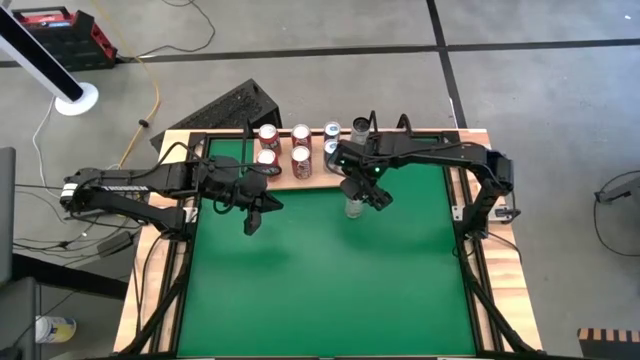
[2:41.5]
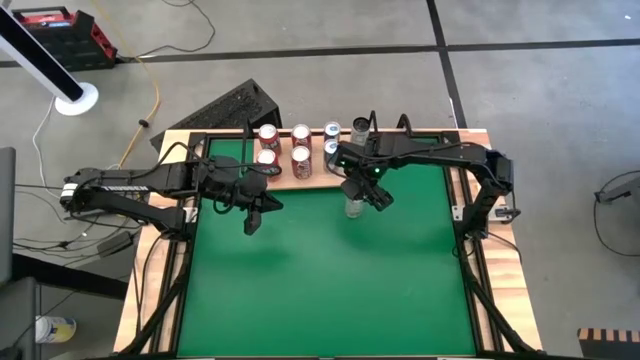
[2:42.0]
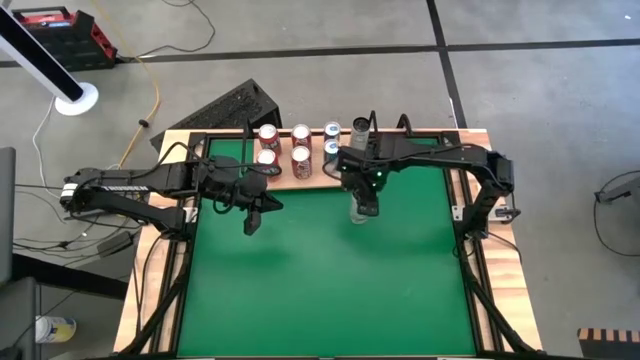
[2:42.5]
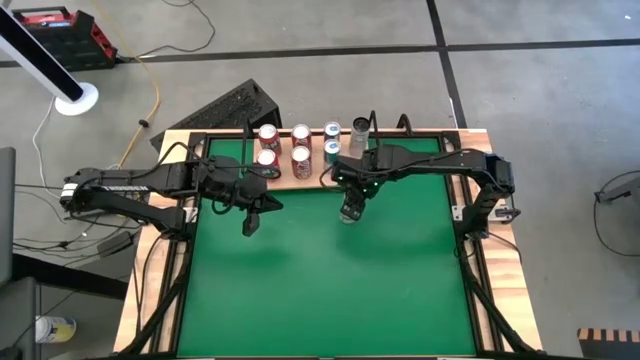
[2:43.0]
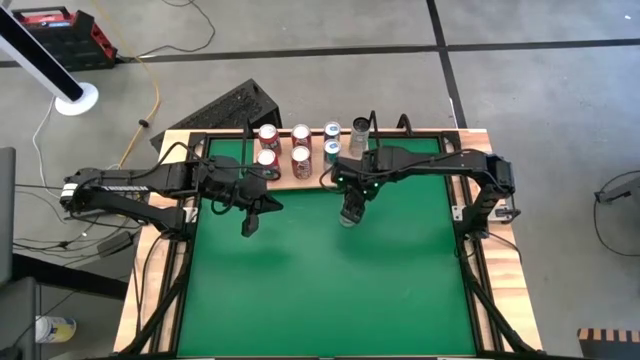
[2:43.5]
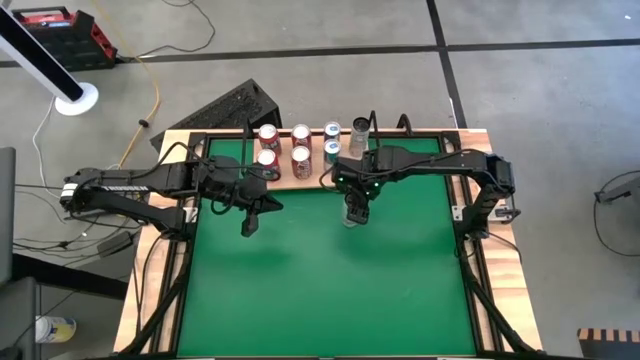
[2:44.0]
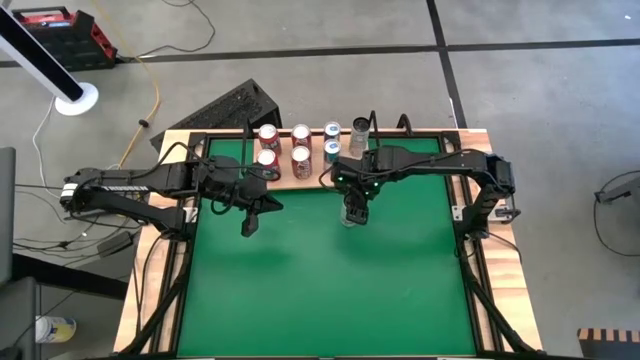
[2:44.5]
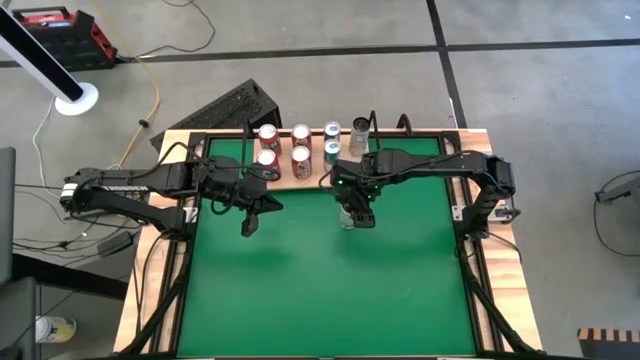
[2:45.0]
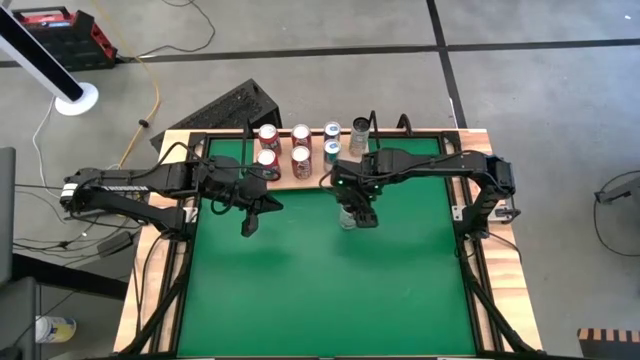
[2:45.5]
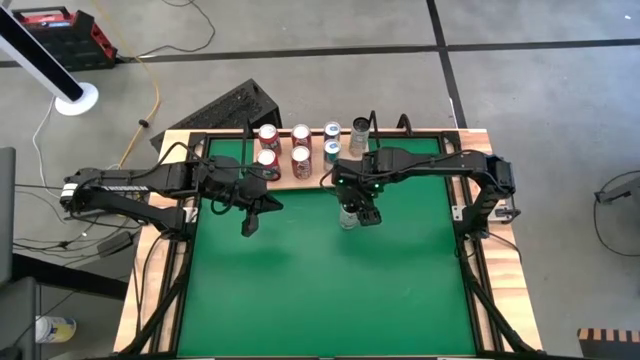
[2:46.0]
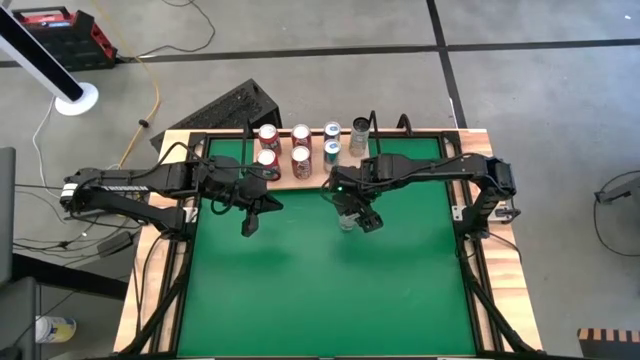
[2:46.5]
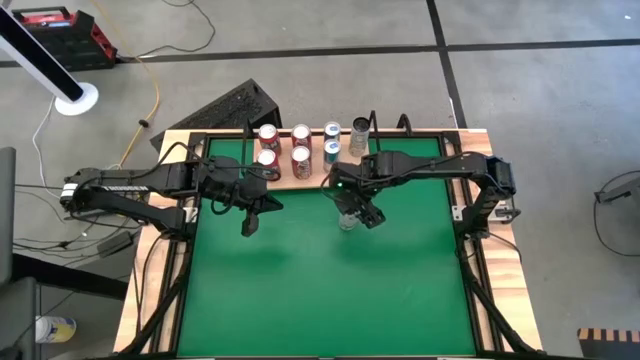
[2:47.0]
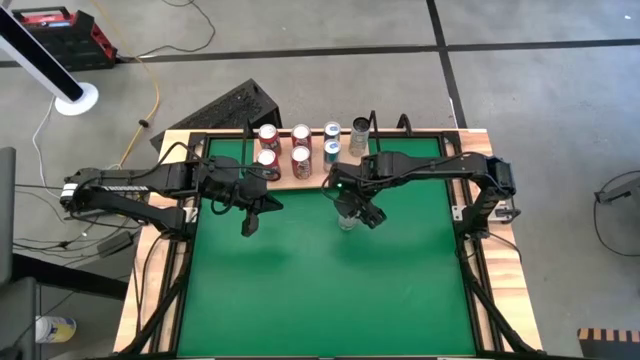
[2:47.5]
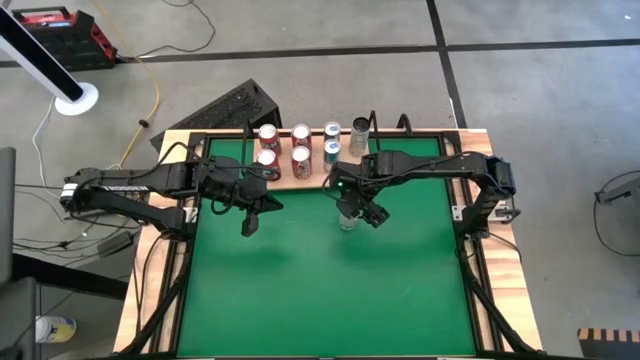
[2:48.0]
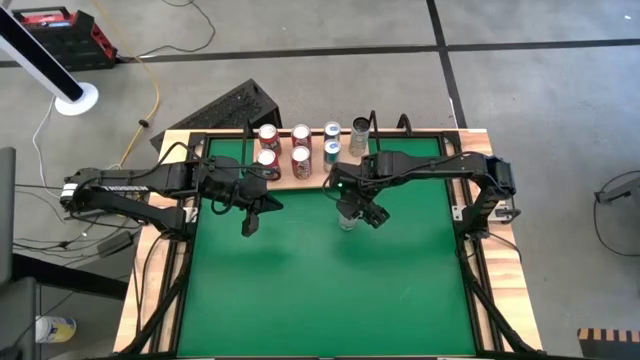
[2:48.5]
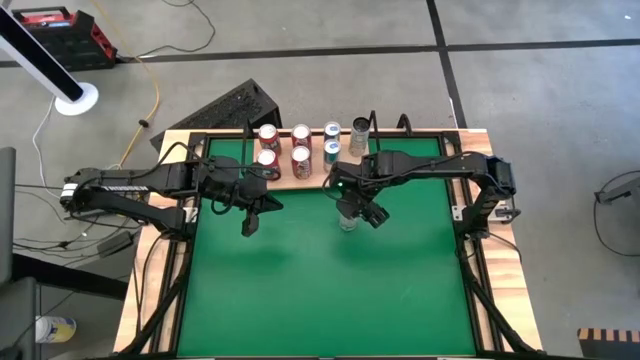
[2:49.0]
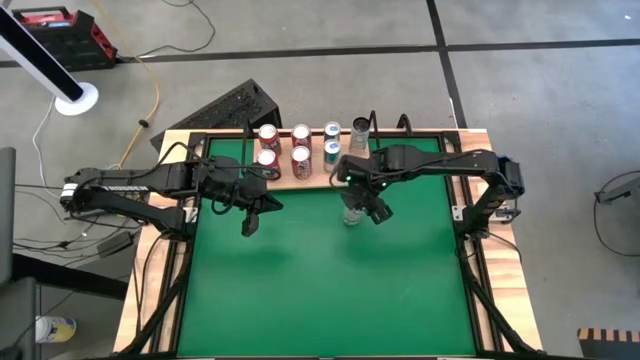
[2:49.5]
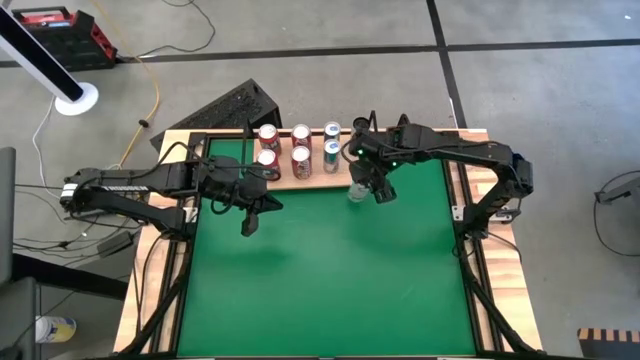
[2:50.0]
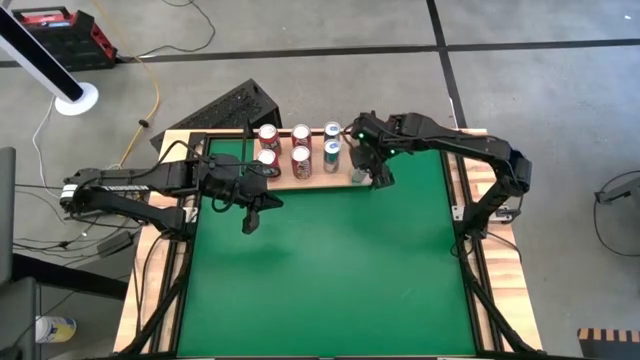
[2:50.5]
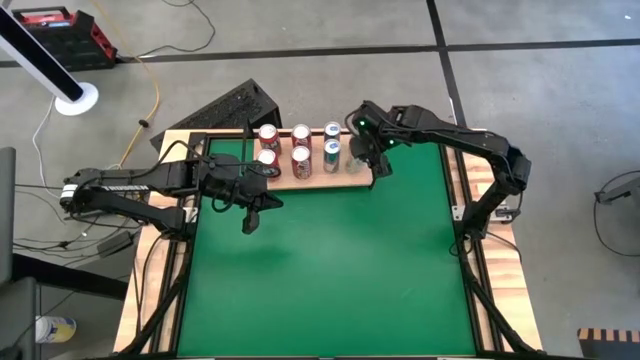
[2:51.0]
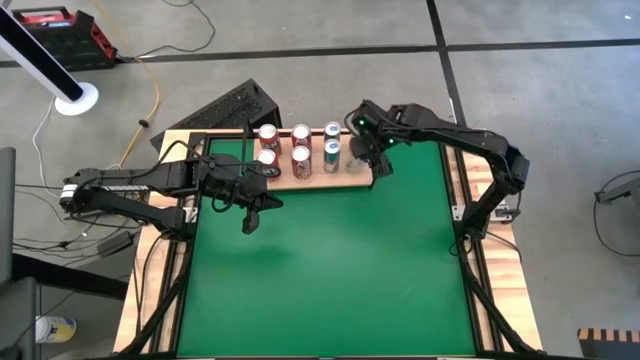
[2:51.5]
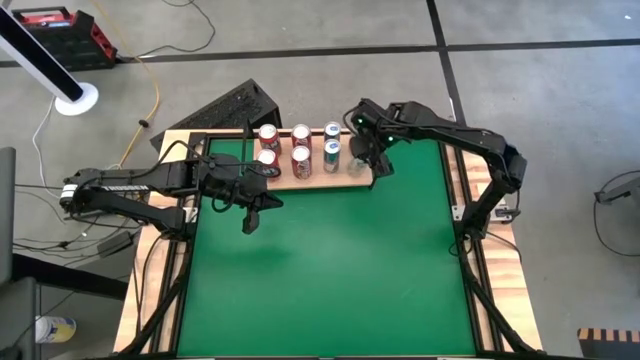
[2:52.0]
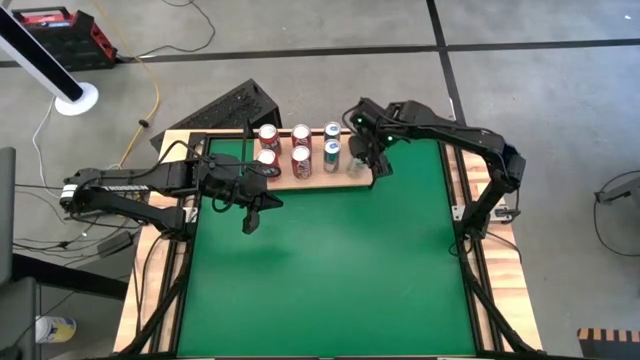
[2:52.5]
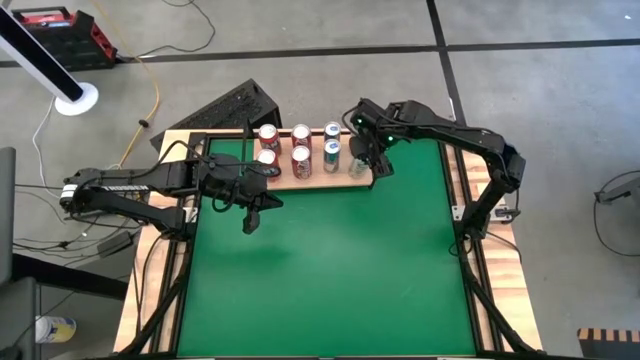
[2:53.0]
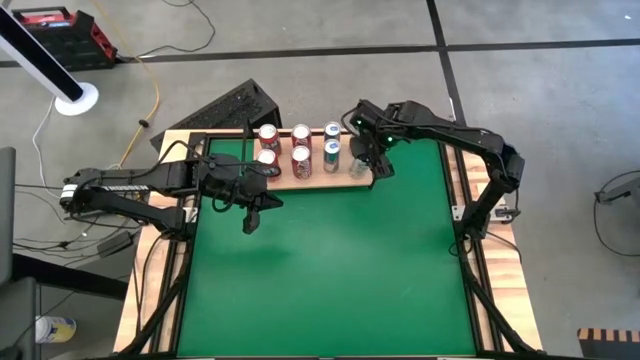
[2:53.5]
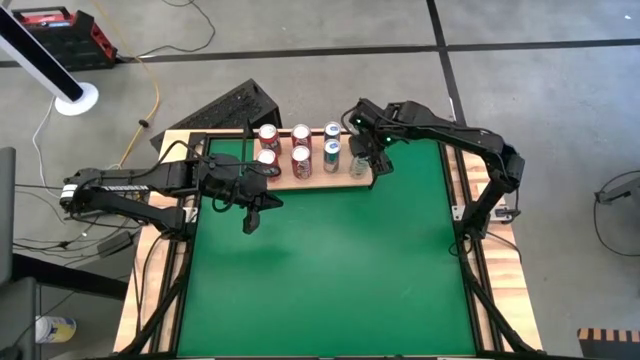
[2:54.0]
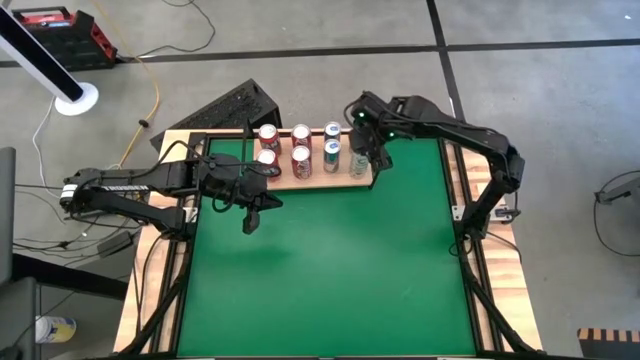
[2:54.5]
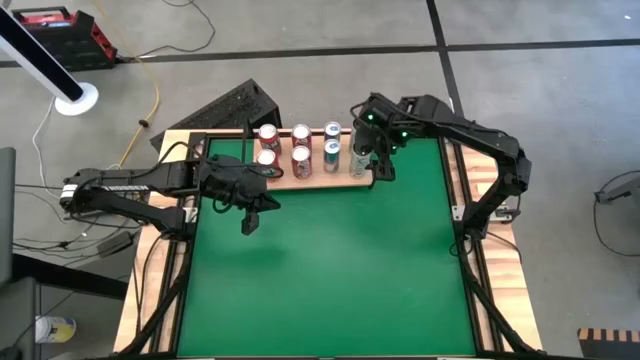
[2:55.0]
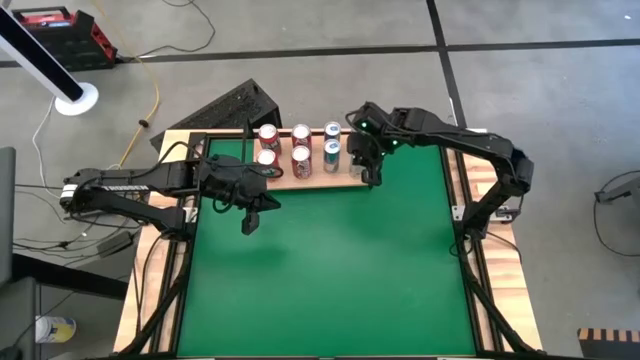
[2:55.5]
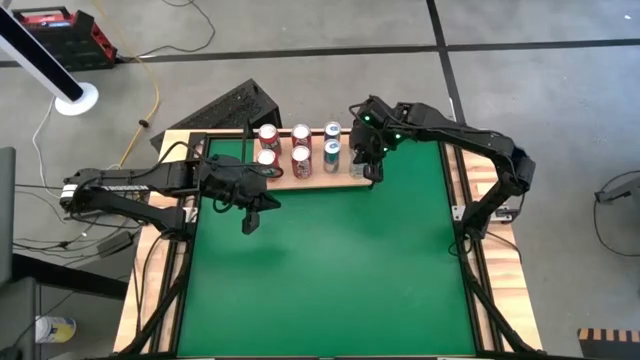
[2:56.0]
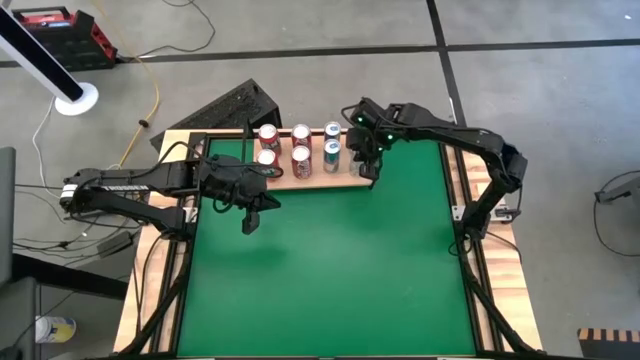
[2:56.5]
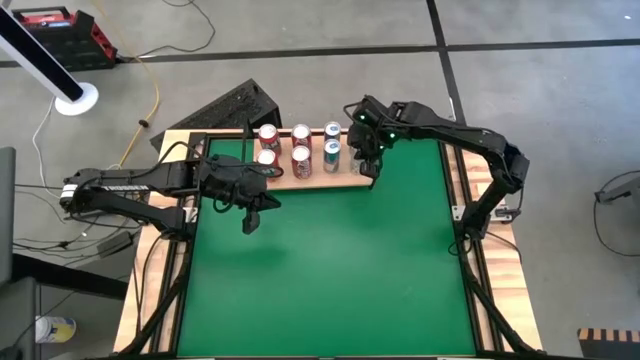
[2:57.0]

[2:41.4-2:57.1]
Task: Place canned beverage on shelf
Put the white and yellow soda can, aligned with the other blue soda can on the shelf

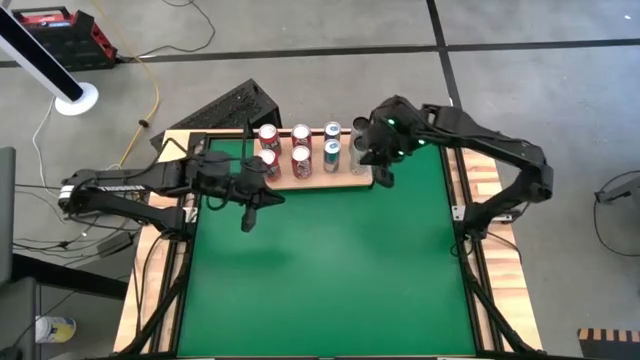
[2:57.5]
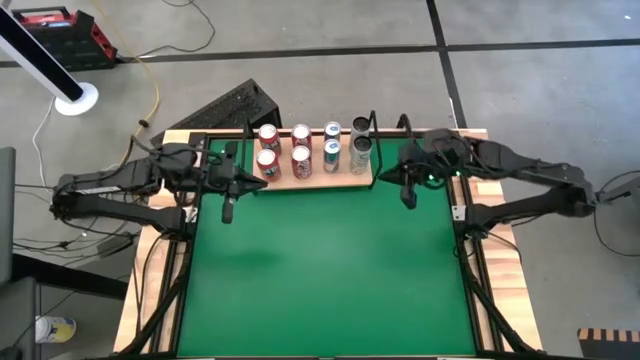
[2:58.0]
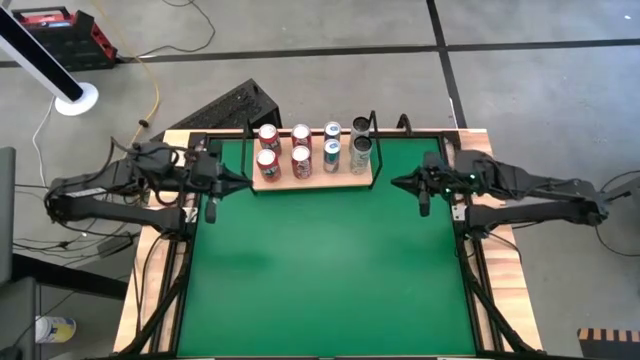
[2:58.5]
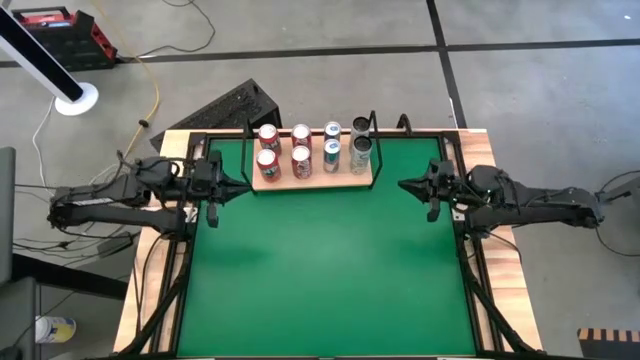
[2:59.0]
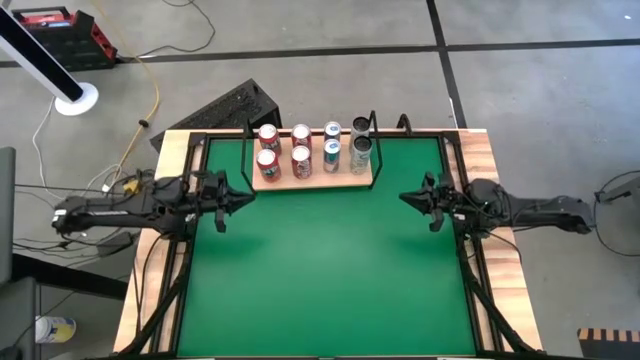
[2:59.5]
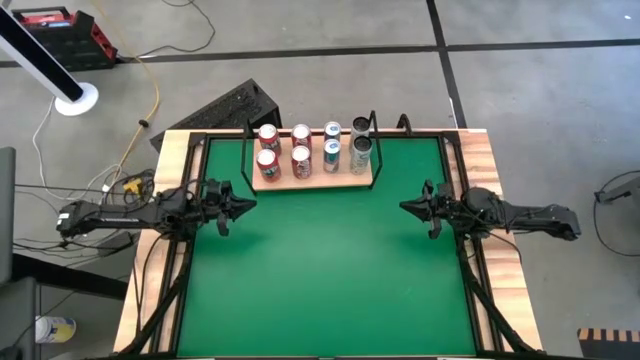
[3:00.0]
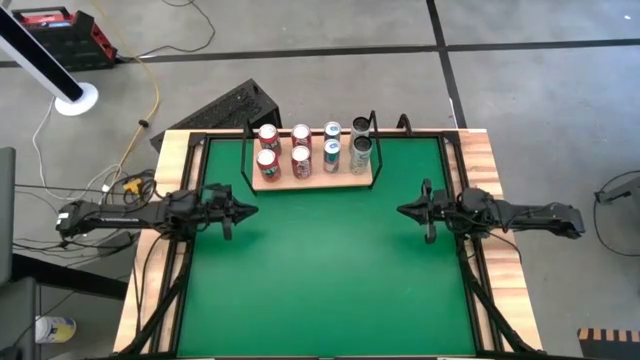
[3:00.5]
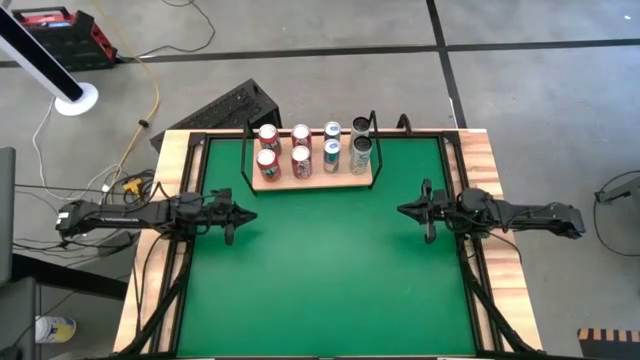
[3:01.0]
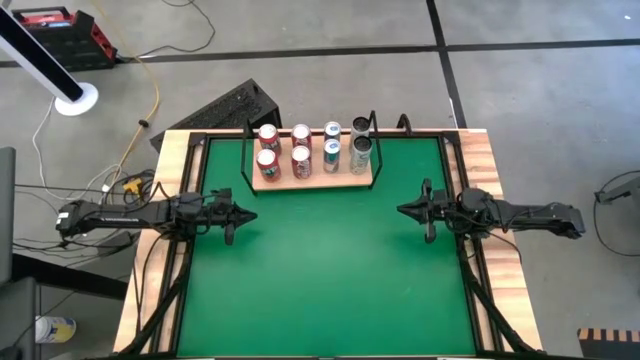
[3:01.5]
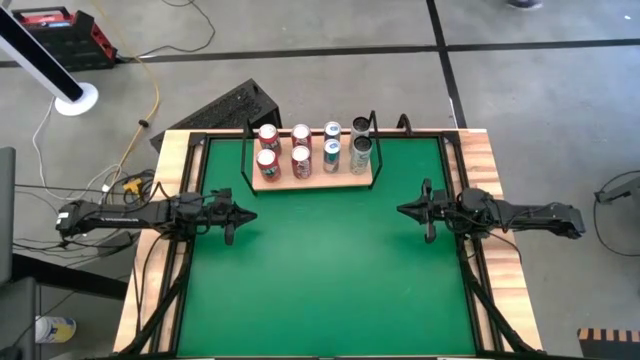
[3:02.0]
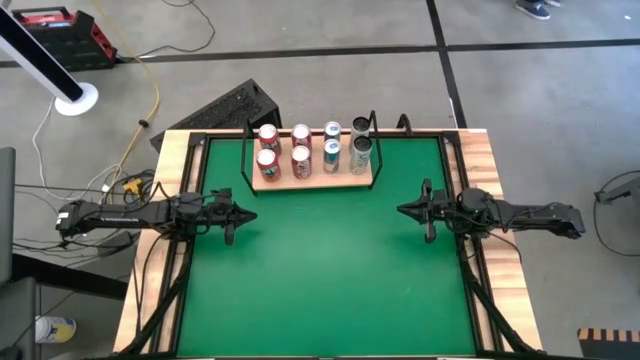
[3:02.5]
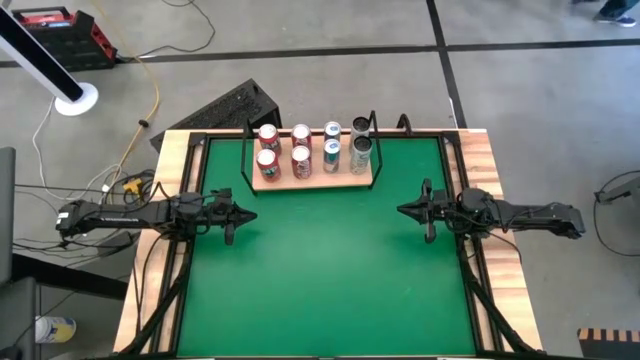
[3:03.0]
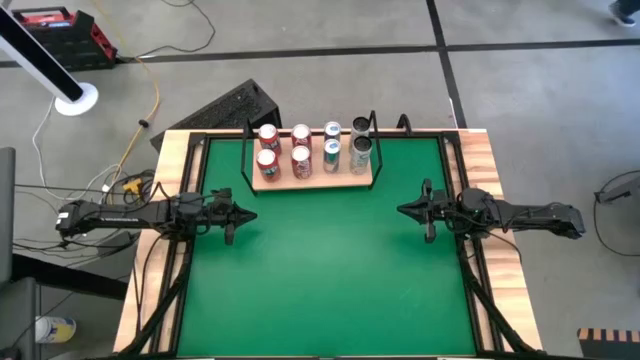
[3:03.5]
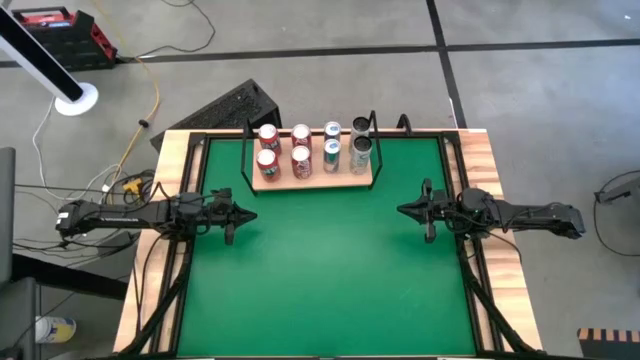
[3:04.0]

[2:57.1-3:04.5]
Return to Home Position
